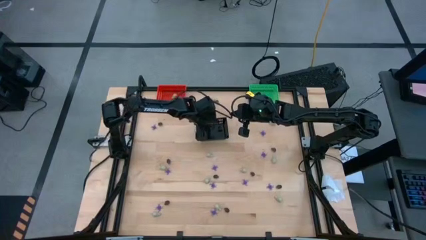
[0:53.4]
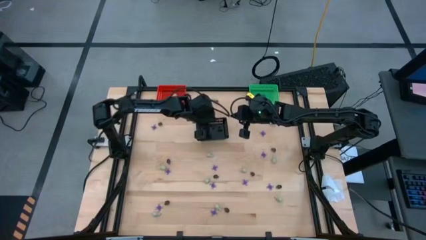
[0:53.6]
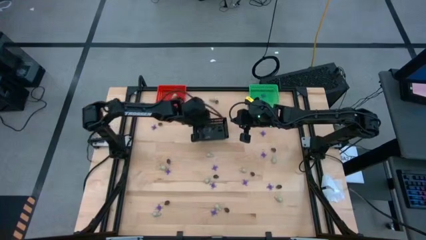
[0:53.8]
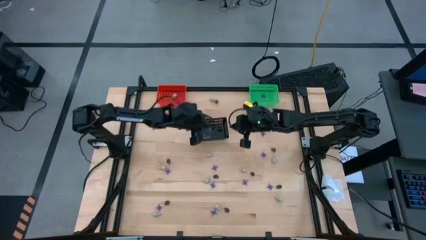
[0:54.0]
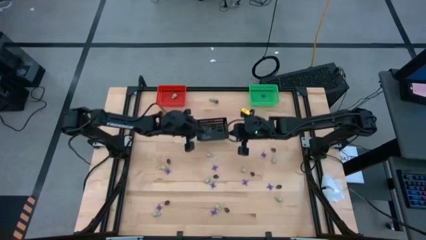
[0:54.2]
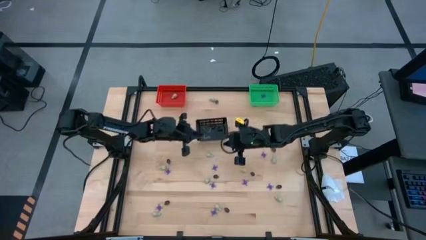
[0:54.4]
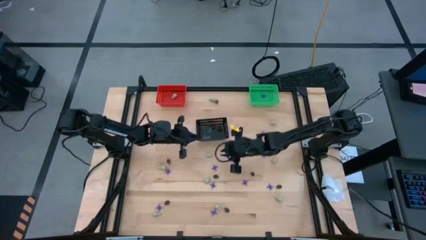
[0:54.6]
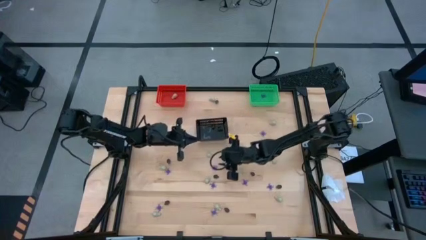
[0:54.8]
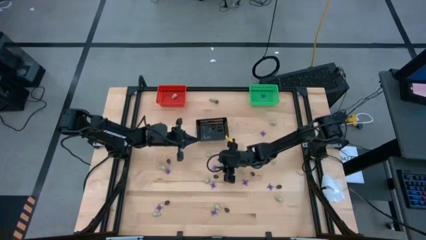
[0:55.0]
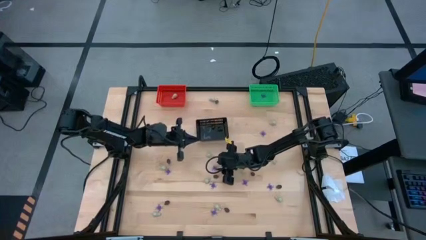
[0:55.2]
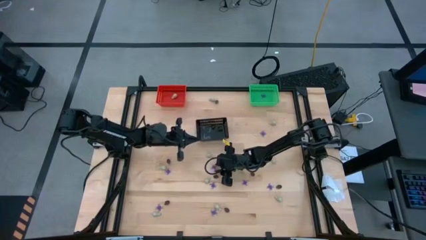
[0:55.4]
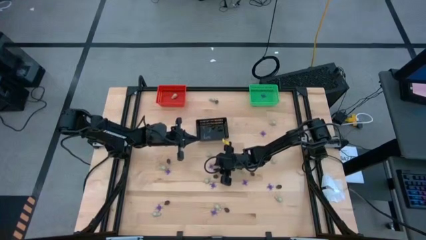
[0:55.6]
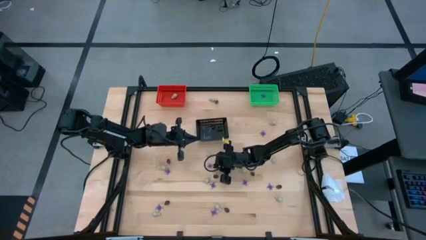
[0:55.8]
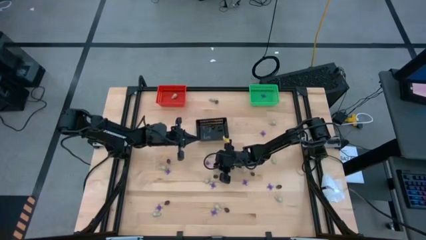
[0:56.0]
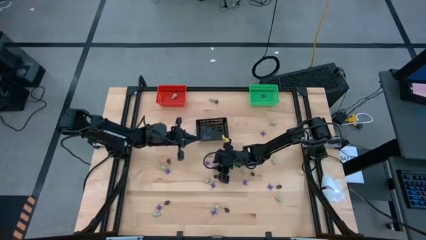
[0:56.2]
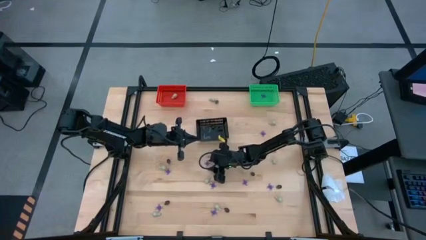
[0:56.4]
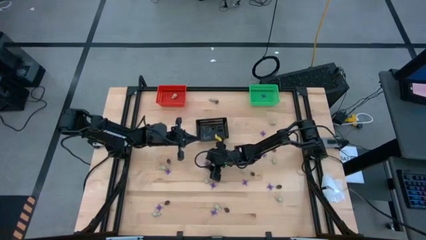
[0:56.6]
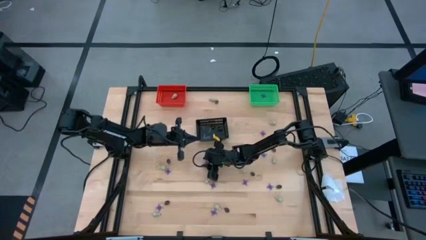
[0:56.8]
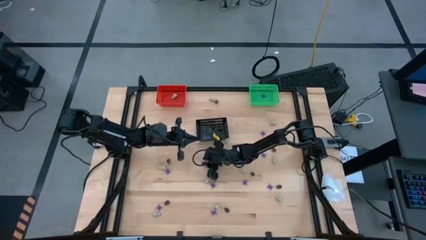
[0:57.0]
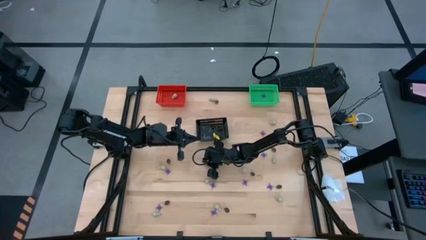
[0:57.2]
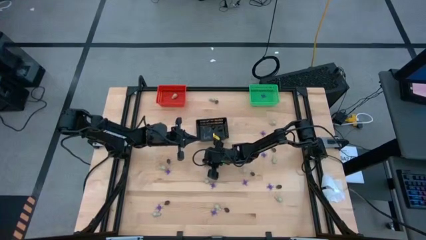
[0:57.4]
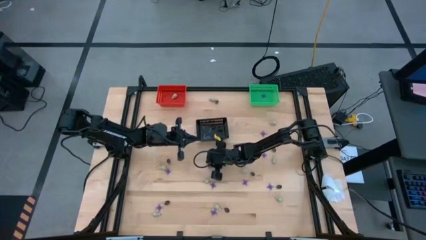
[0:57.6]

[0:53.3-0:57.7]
Task: Sort Halloween decoration
Put the violet spider toy into the green bin

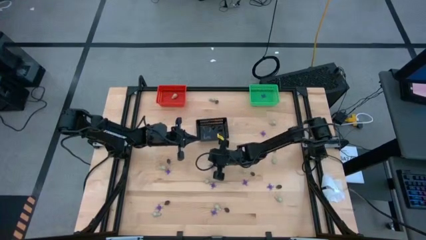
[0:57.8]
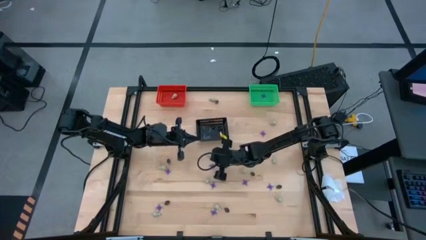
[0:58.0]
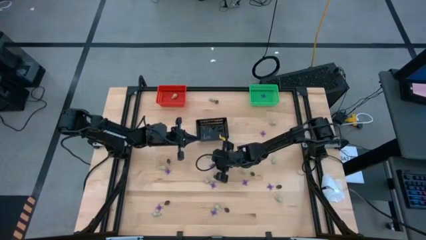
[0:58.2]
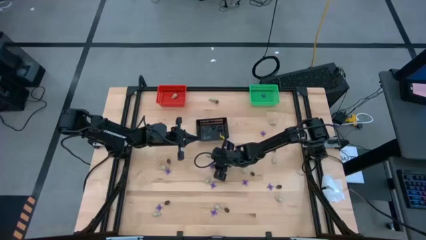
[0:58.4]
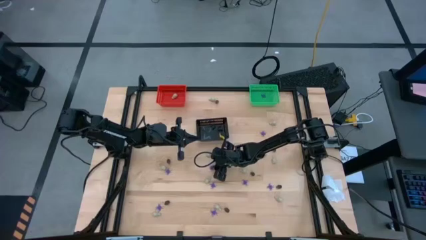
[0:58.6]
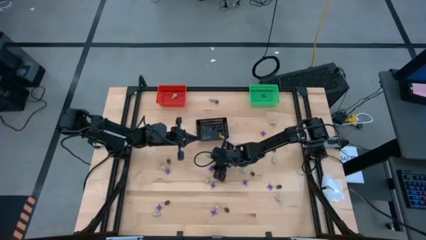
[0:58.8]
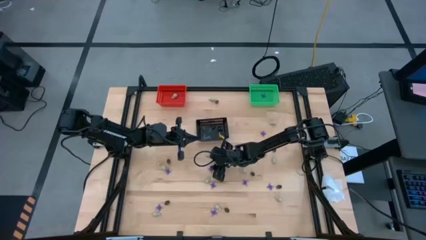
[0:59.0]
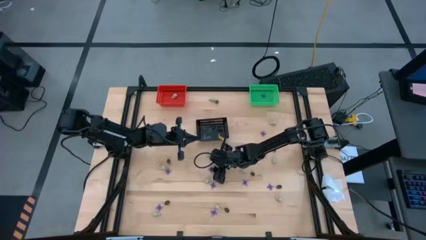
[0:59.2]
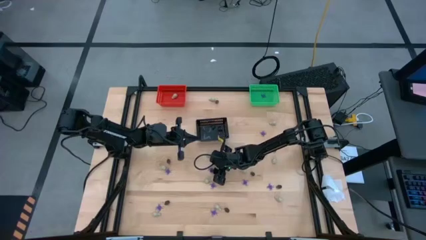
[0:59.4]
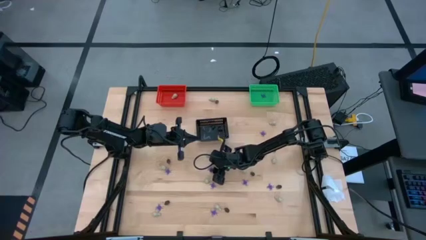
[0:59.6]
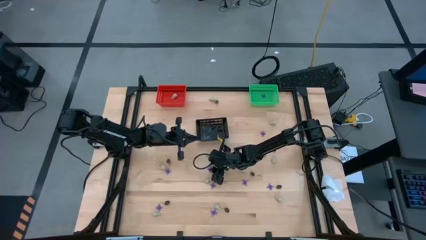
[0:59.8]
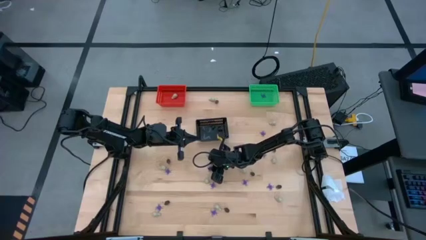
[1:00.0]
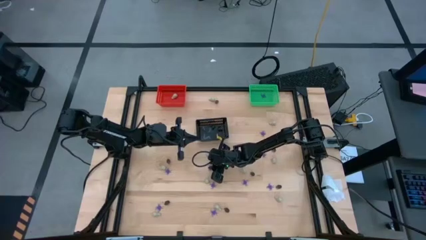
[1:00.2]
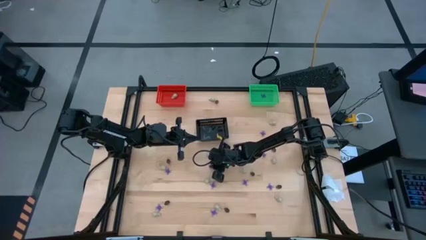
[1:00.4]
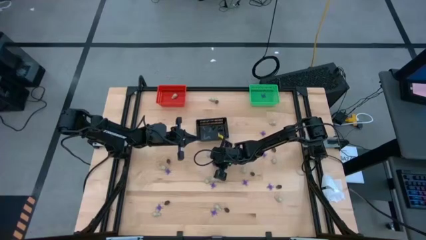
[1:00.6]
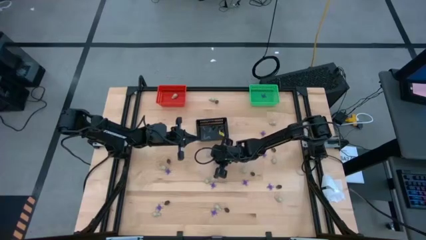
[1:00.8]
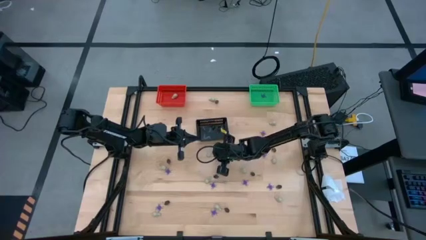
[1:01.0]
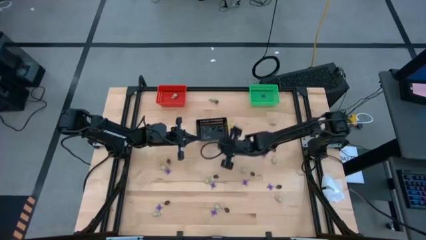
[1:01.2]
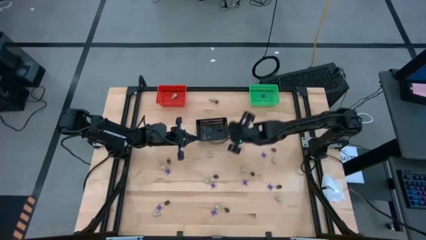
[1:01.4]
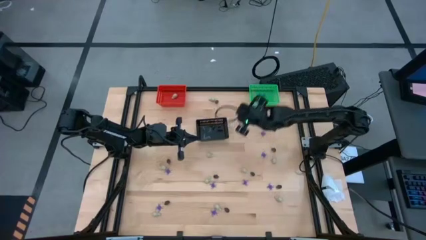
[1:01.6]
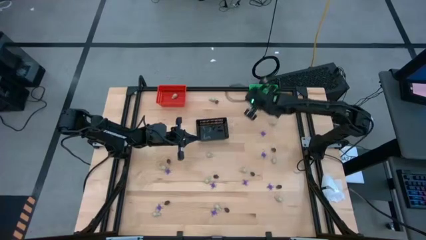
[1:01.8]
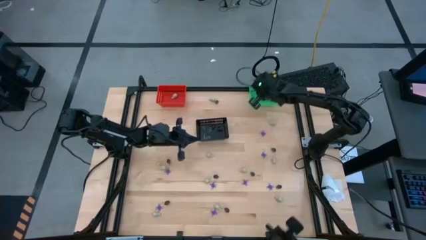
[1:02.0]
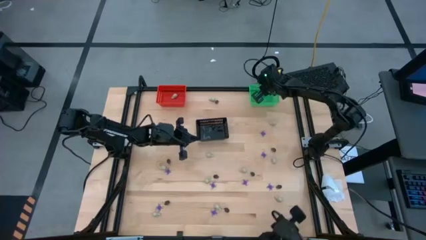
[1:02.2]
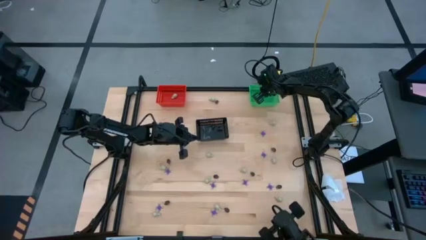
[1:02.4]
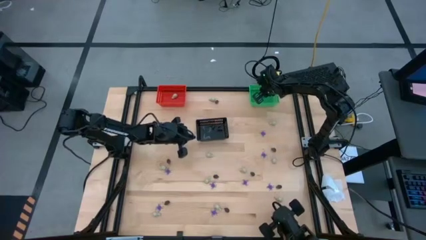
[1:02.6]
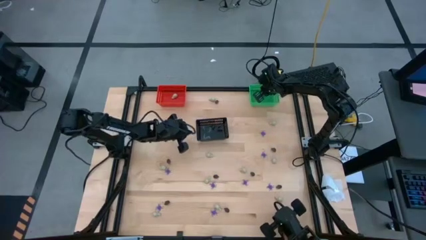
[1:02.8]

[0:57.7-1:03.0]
Put the violet spider toy into the green bin

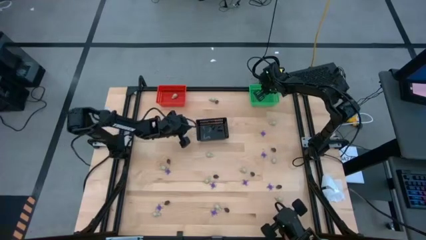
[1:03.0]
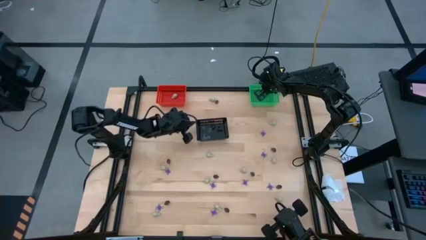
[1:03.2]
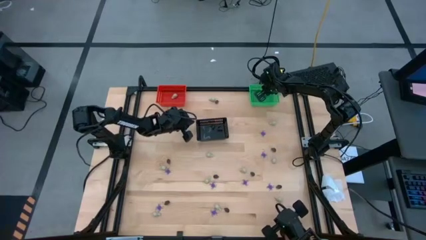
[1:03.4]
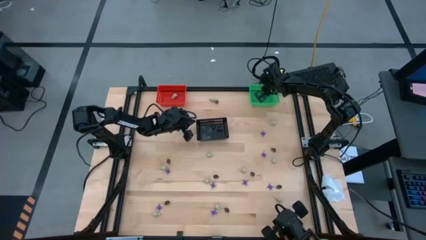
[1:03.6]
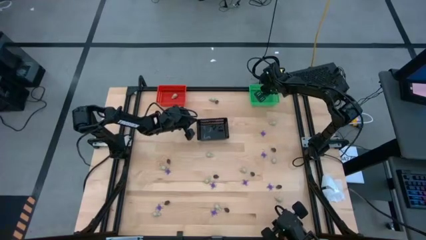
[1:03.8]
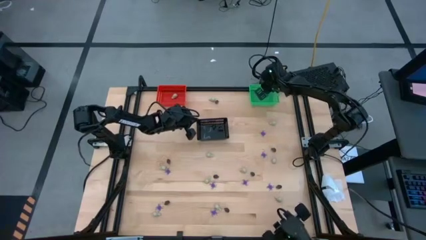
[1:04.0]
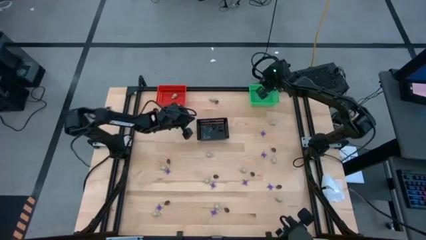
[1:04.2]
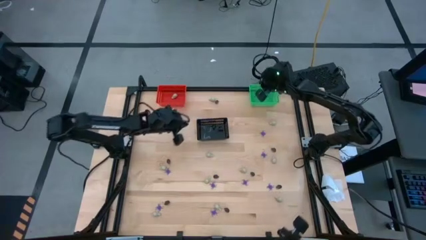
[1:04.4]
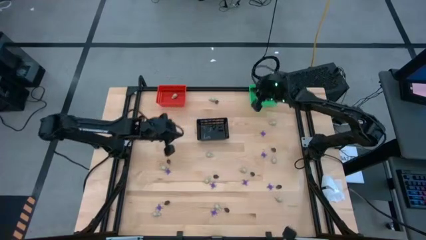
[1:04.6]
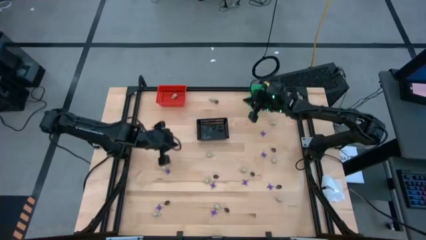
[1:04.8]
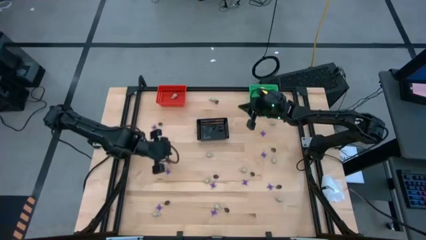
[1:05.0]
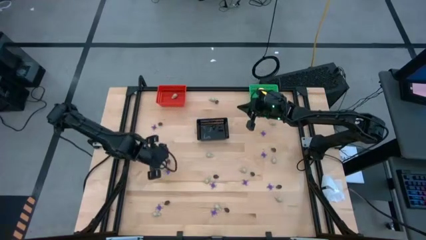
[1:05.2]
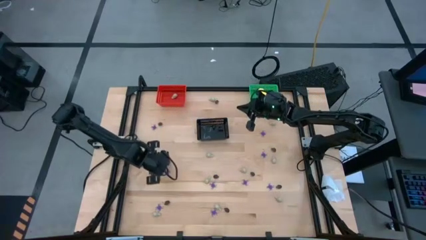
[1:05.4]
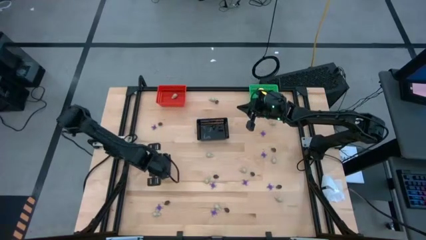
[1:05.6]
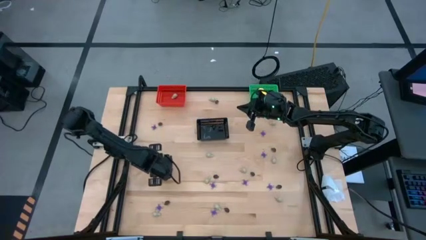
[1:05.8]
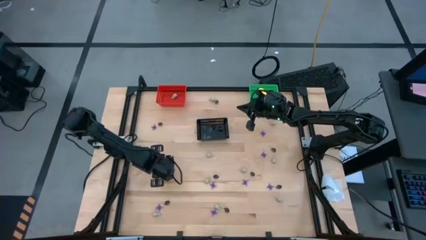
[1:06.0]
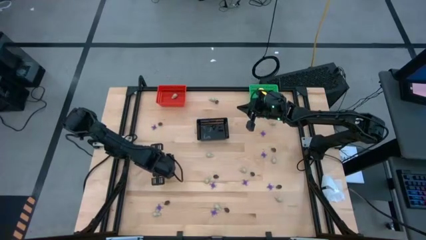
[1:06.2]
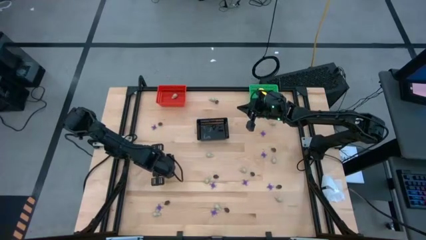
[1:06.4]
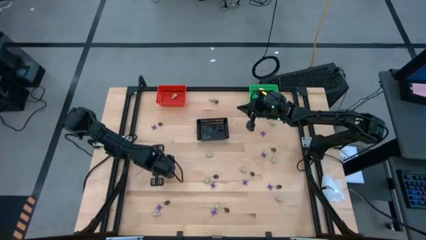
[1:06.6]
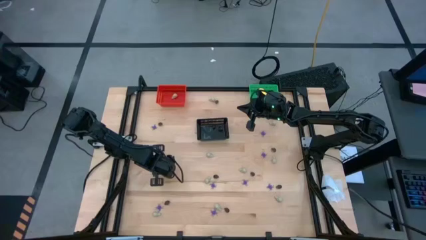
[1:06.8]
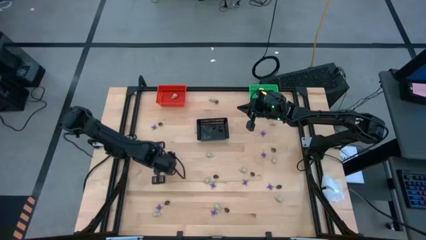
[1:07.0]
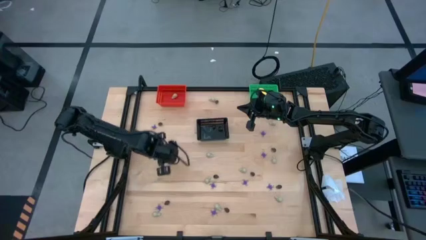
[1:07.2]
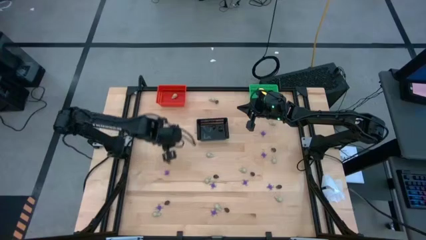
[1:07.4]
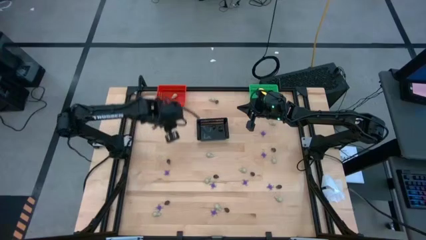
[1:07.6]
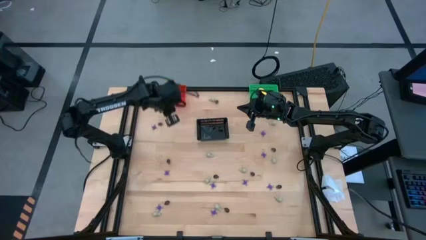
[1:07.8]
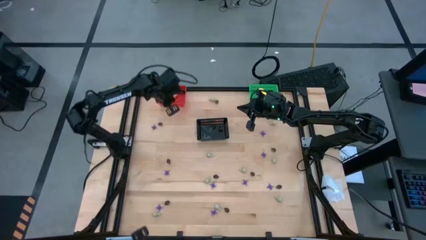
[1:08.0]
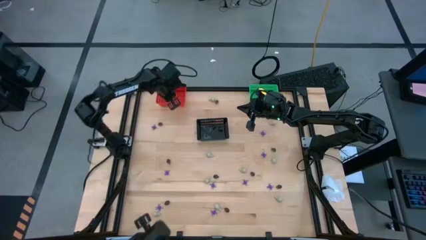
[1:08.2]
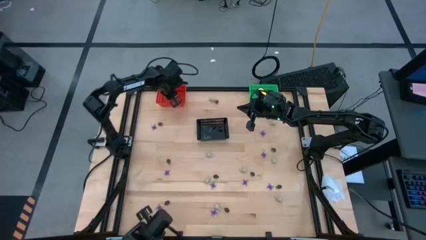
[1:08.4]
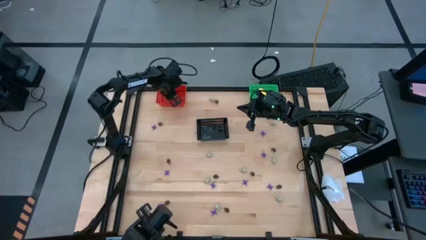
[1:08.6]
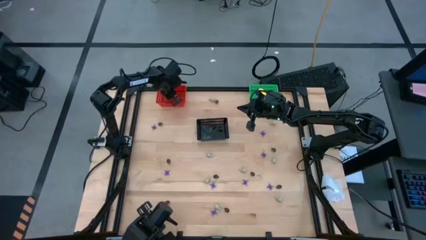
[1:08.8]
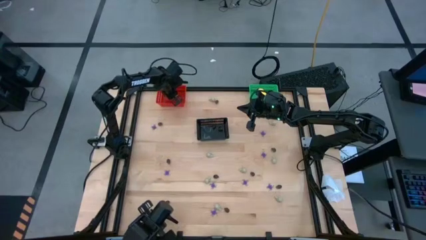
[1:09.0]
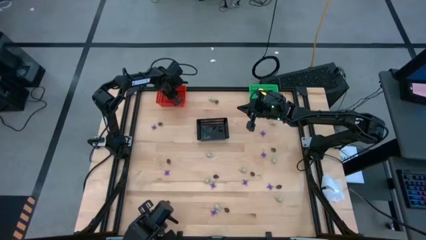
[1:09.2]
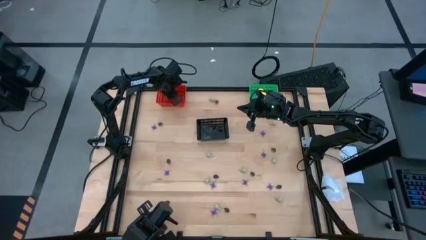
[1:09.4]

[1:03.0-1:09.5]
Put the white skull toy into the orange bin
